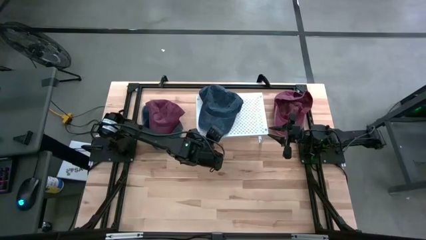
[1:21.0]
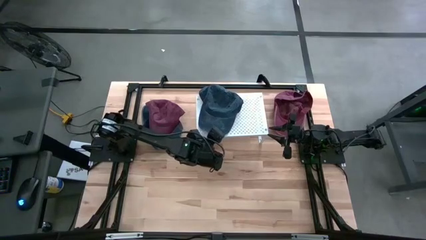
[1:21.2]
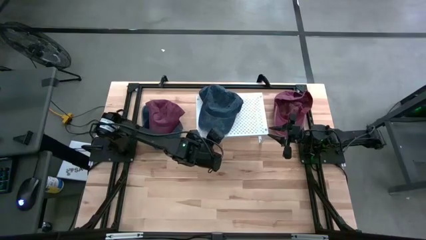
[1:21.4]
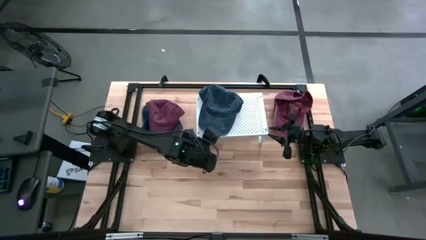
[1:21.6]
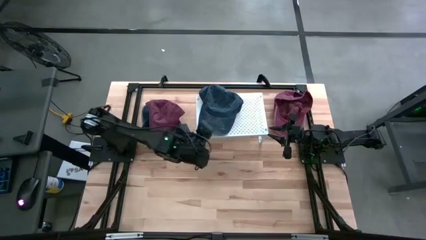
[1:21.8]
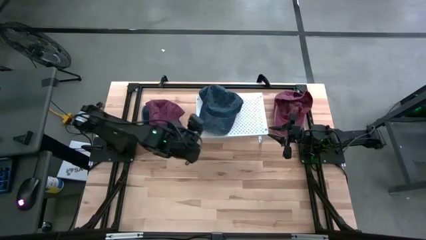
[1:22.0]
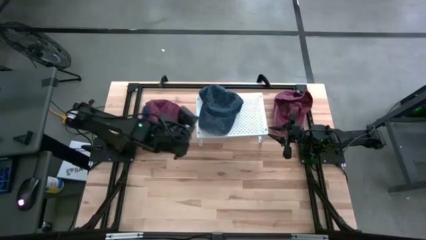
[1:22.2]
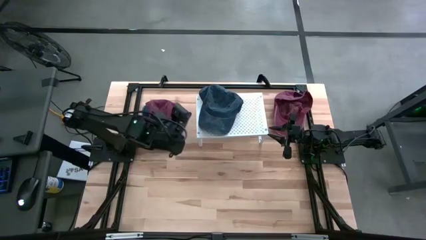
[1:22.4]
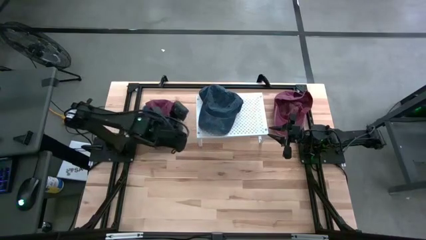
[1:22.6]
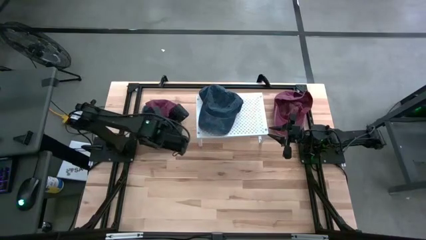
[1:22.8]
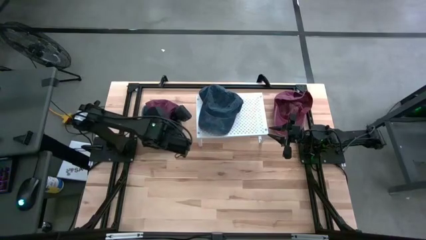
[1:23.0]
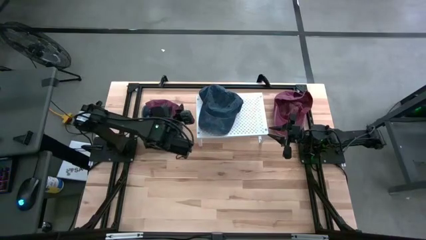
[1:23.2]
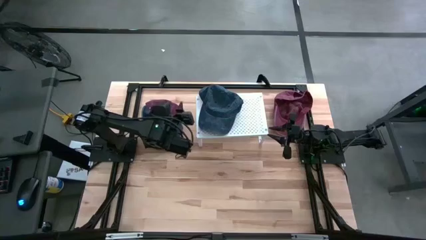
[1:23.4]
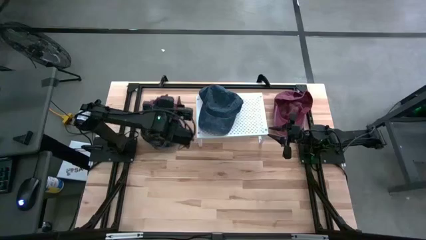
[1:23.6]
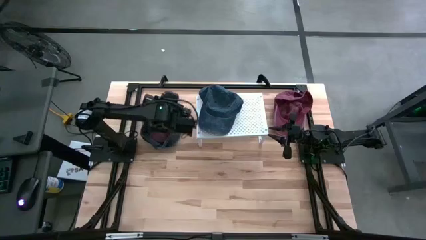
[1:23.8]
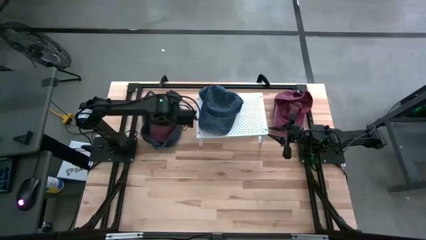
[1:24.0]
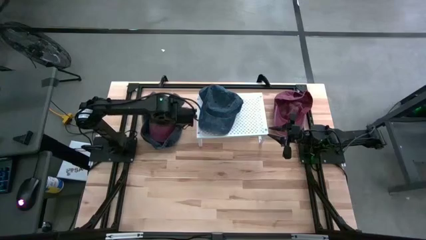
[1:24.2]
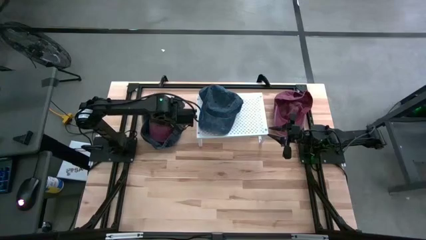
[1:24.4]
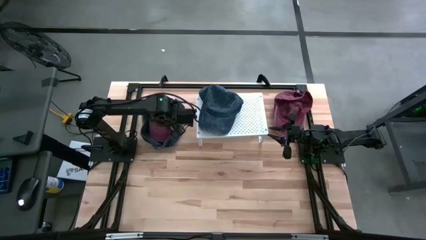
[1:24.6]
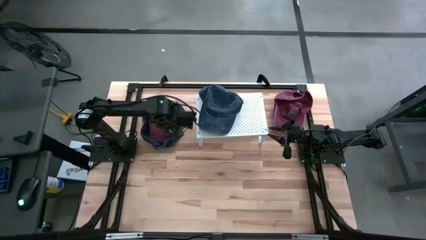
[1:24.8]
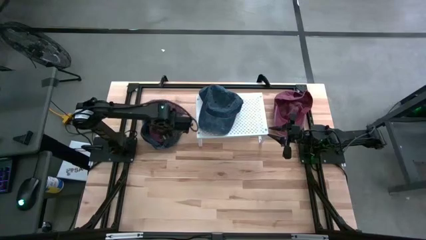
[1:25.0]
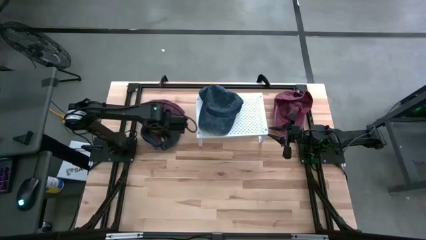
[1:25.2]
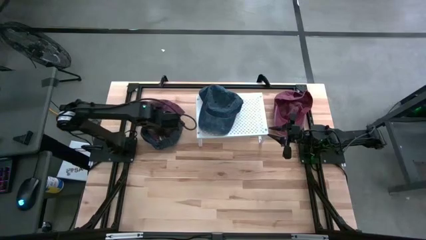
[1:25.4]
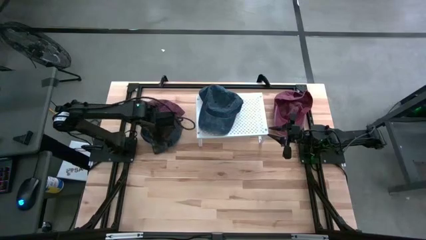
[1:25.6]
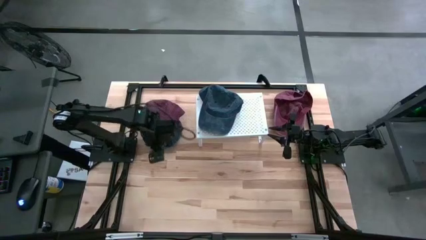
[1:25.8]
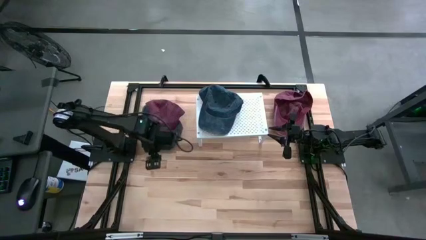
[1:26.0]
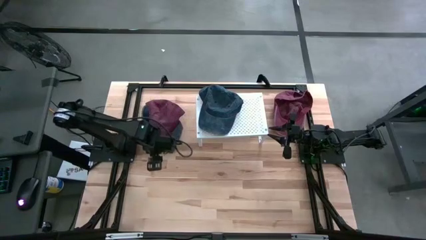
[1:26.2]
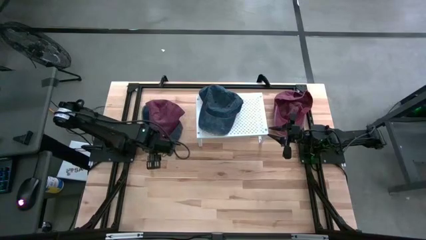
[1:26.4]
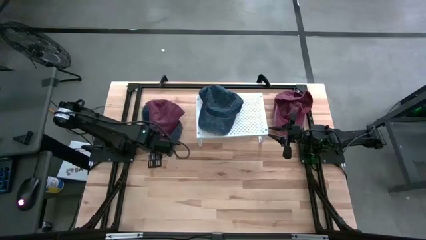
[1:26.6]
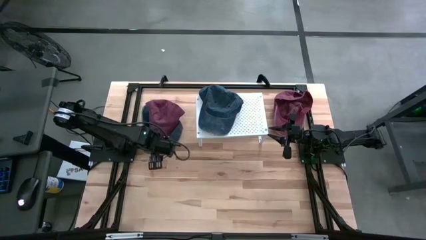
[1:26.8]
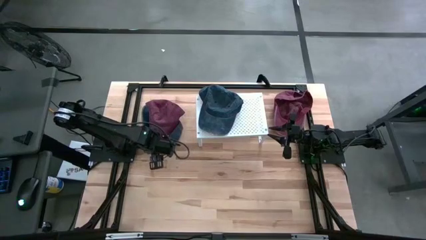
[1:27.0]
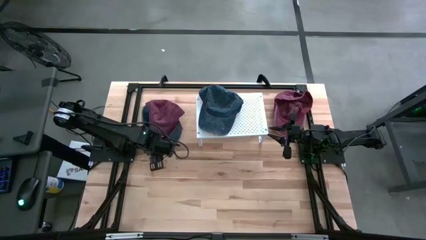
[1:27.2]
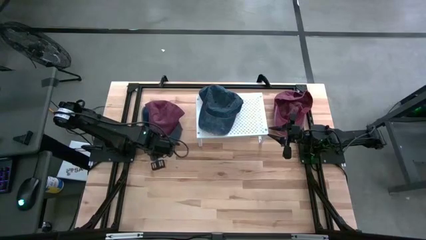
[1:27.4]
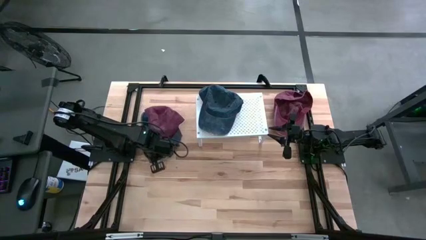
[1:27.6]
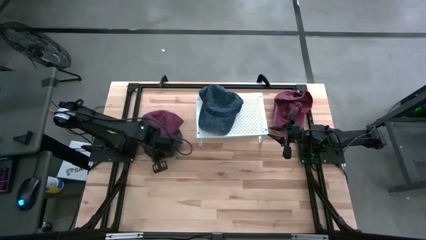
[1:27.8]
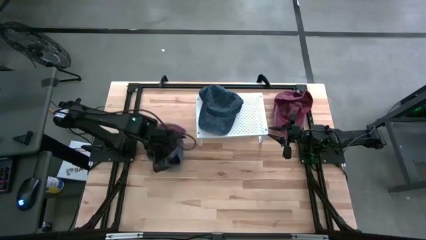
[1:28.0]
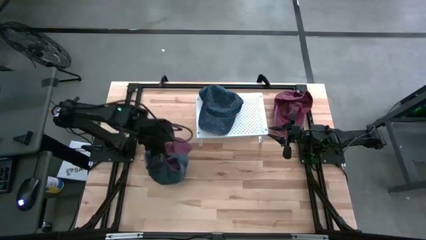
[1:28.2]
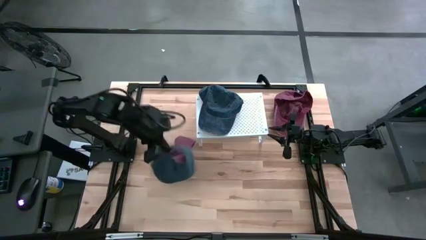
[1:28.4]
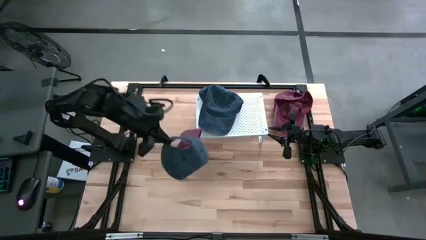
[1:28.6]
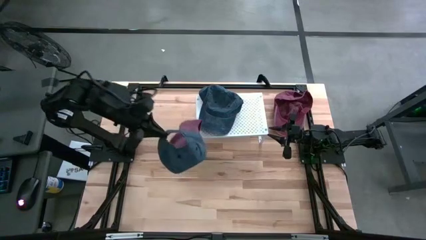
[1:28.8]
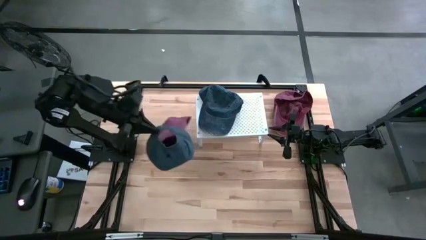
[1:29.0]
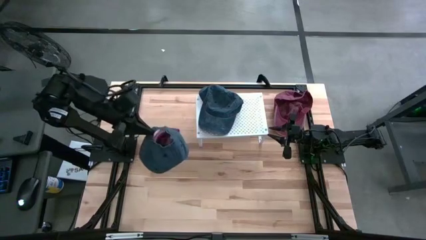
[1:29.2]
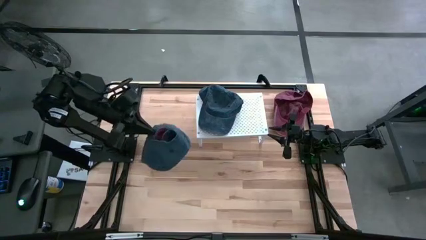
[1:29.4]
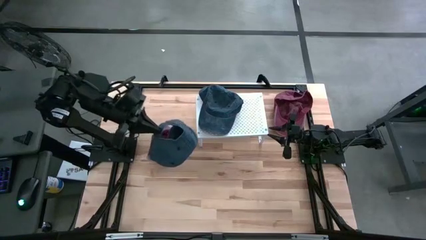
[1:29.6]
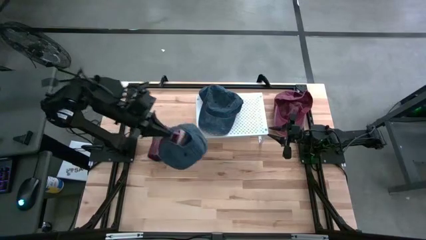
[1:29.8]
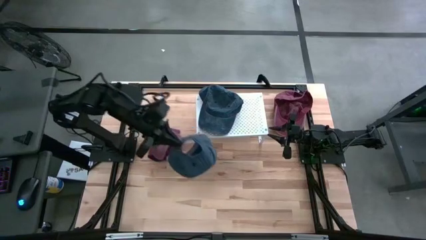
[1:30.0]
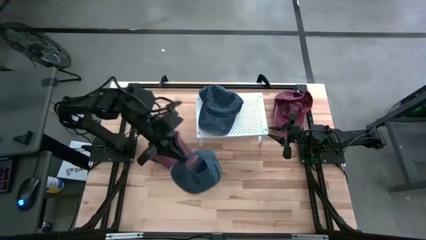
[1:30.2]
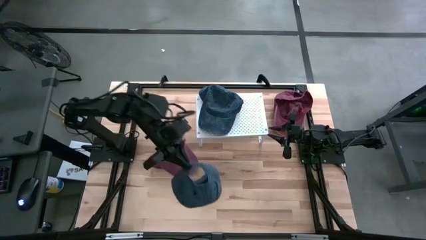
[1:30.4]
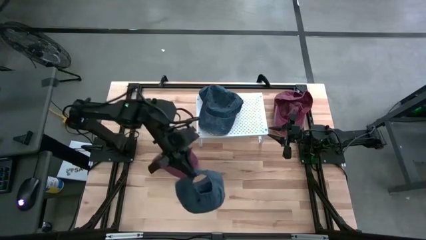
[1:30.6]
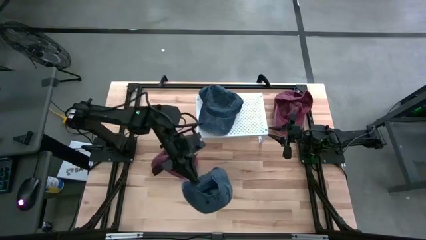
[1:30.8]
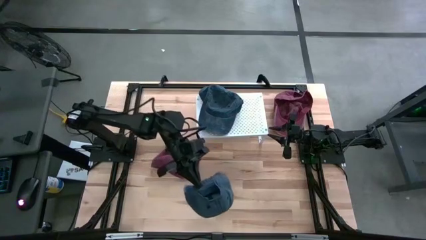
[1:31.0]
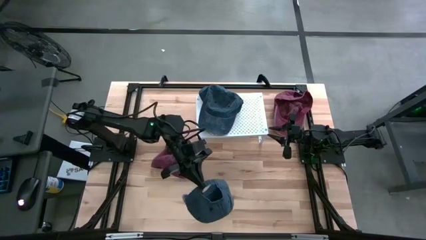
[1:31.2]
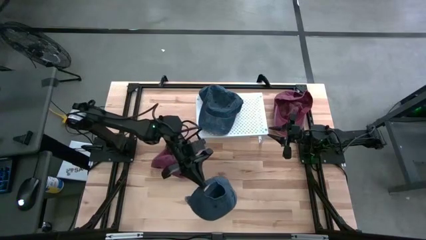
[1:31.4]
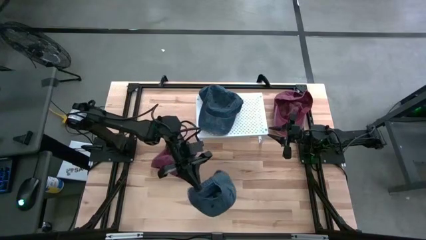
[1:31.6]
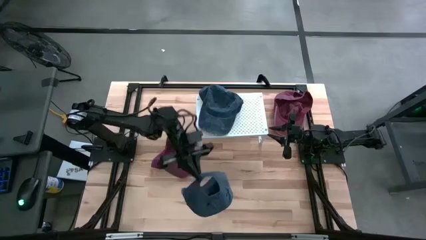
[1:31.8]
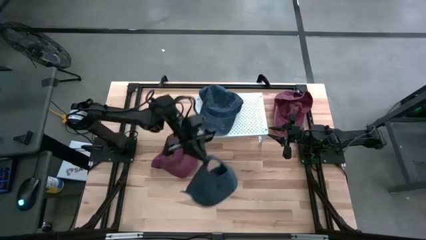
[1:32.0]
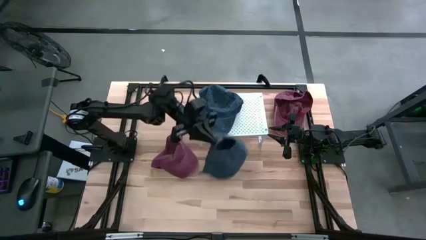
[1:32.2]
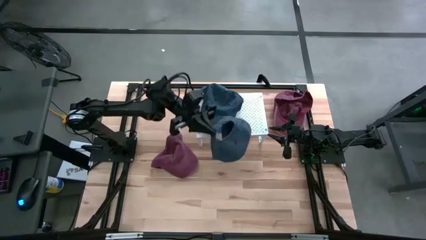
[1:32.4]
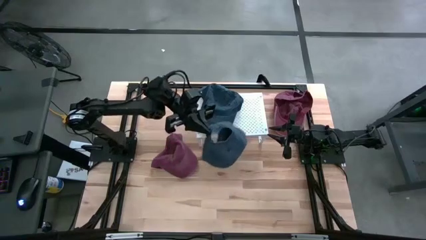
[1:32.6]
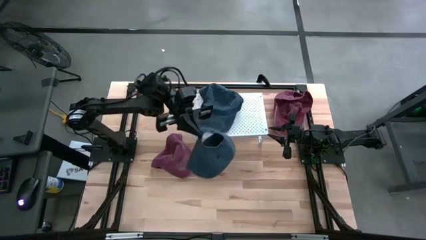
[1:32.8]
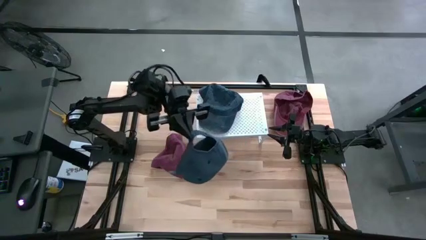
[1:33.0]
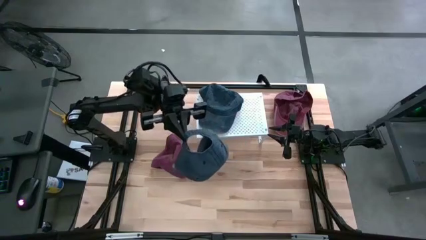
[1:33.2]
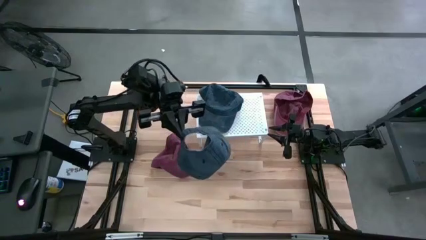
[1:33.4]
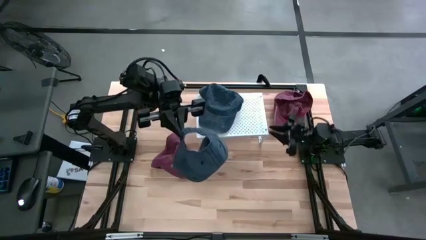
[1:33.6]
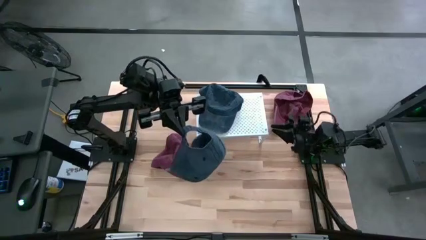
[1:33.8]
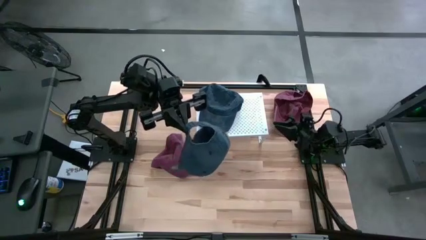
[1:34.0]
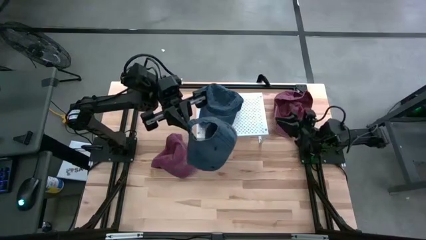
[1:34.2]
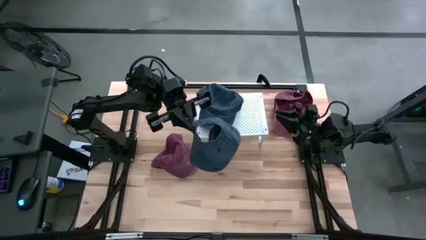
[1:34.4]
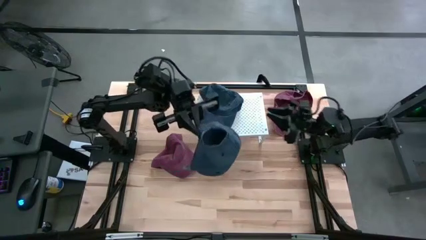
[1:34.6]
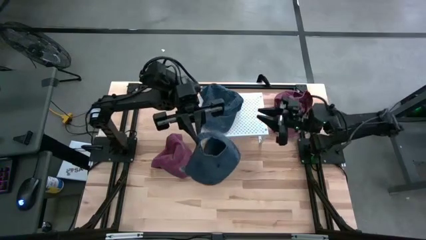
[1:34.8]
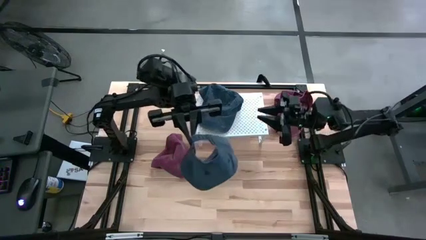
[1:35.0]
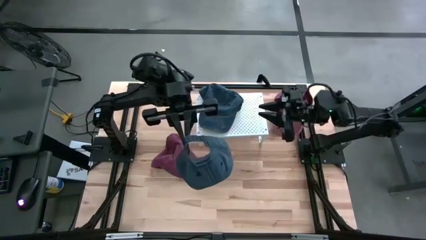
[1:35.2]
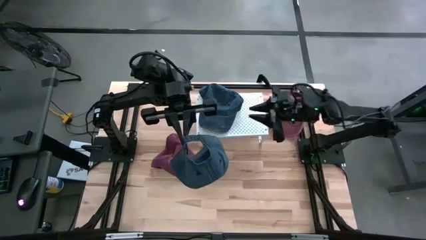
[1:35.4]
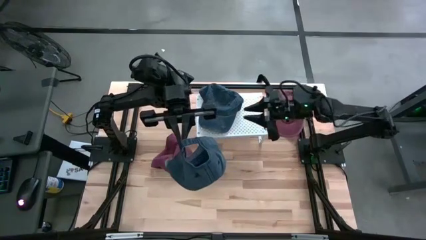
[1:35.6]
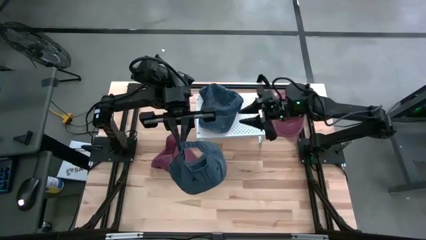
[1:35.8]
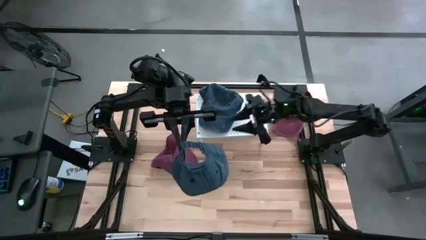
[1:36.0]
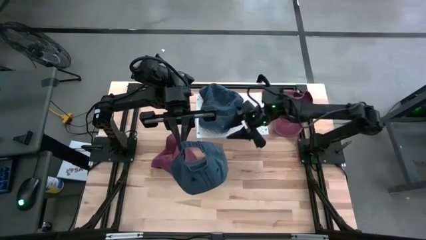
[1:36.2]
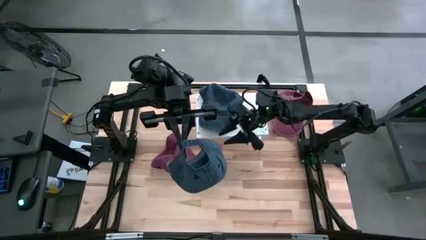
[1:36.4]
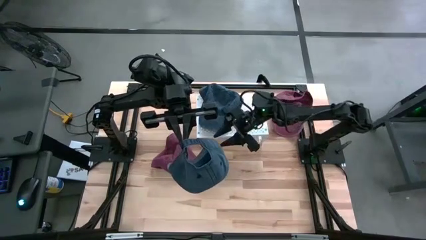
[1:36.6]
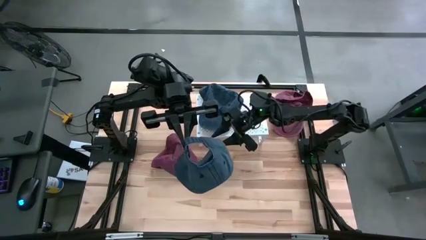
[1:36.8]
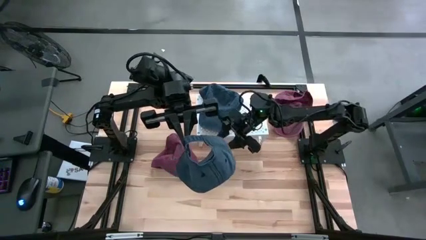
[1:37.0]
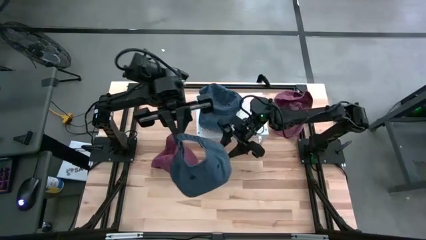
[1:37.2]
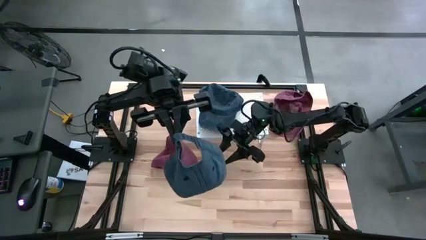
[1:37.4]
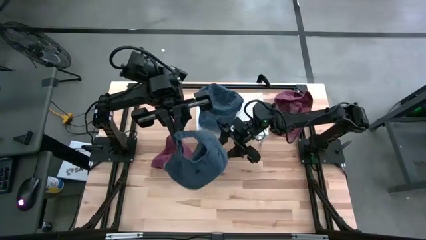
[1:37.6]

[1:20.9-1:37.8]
Task: Pick & Place hat
Stack the blue cap on top of the other blue cap on the shelf
